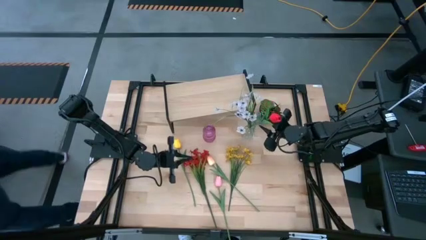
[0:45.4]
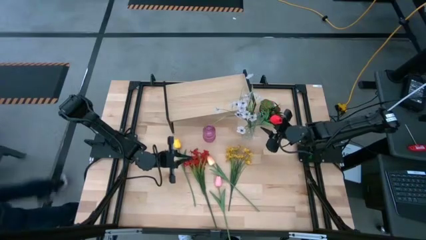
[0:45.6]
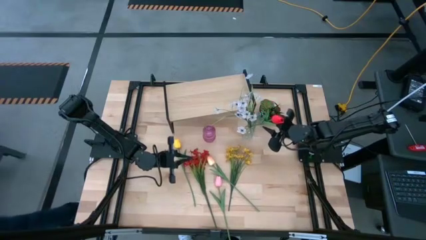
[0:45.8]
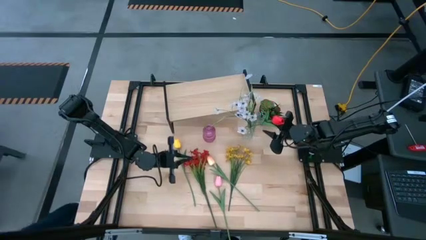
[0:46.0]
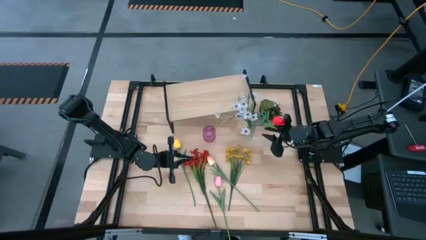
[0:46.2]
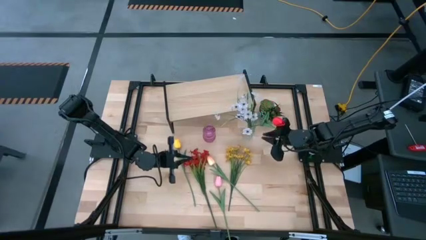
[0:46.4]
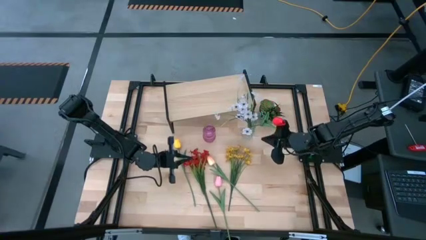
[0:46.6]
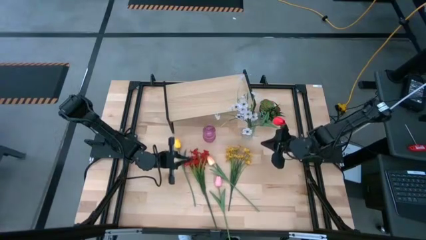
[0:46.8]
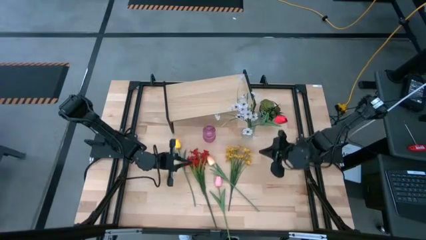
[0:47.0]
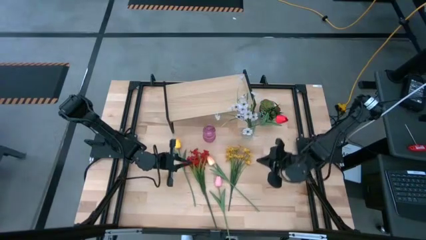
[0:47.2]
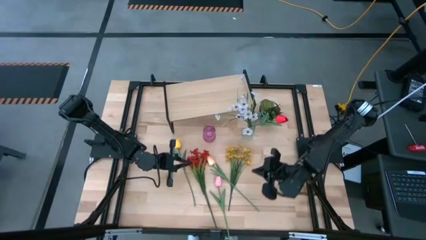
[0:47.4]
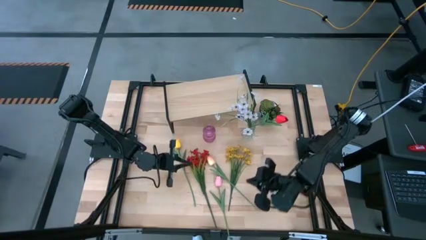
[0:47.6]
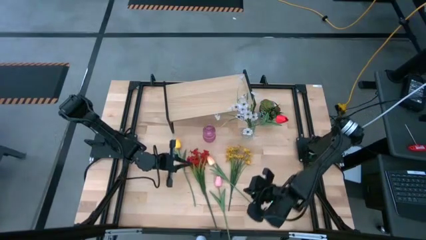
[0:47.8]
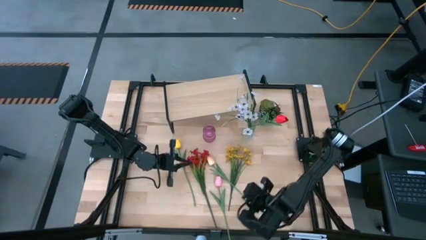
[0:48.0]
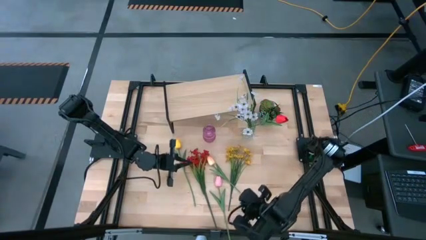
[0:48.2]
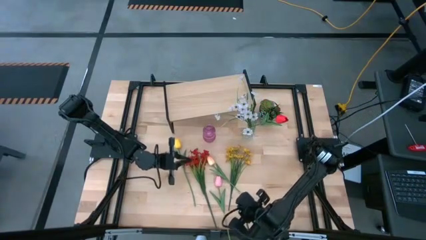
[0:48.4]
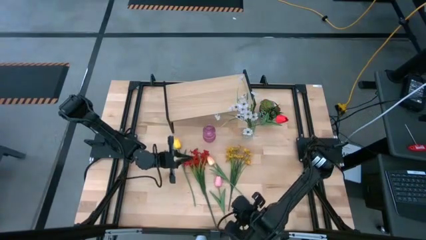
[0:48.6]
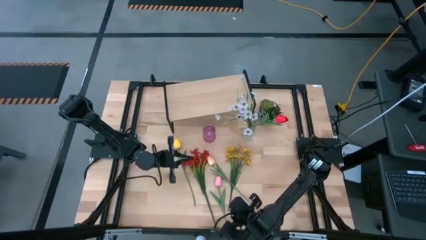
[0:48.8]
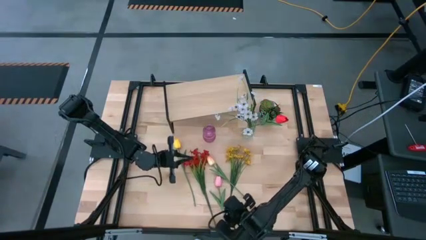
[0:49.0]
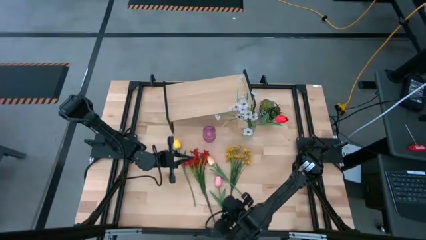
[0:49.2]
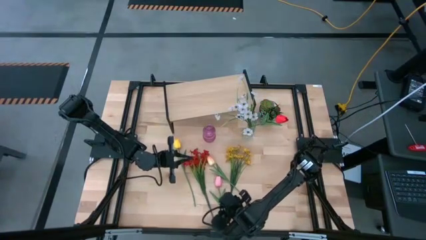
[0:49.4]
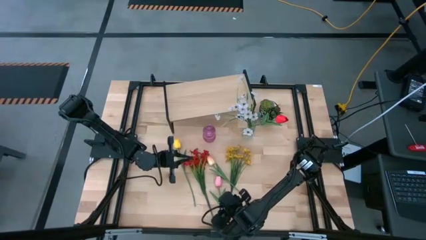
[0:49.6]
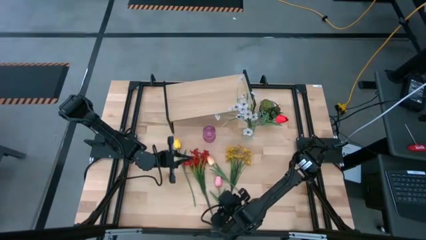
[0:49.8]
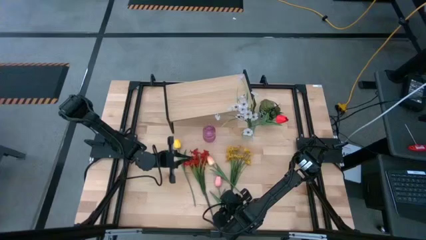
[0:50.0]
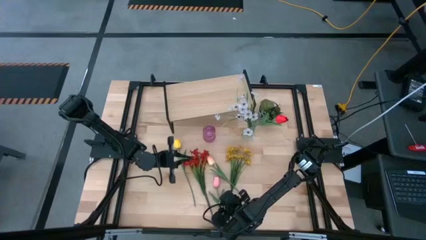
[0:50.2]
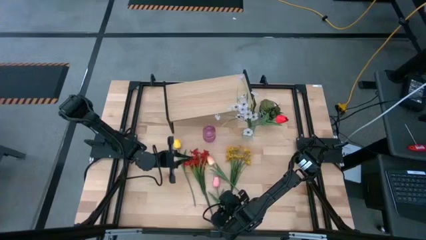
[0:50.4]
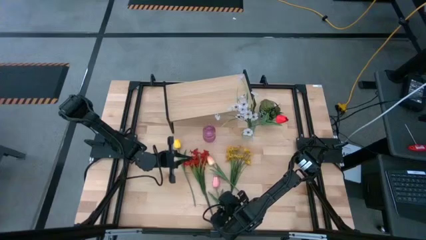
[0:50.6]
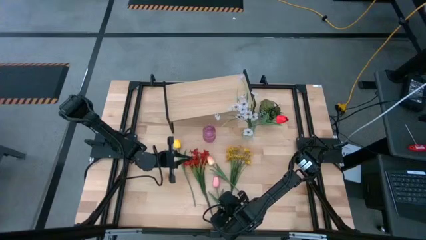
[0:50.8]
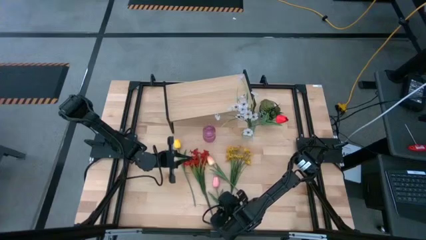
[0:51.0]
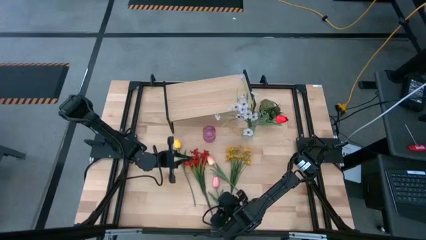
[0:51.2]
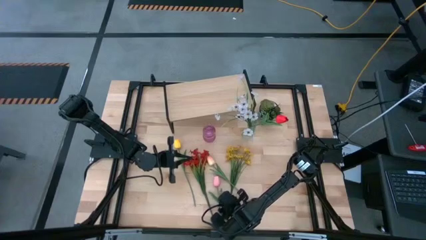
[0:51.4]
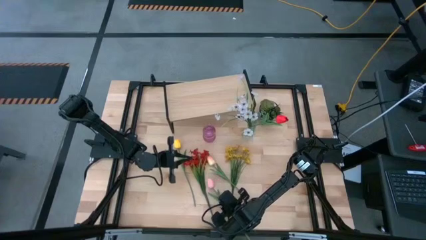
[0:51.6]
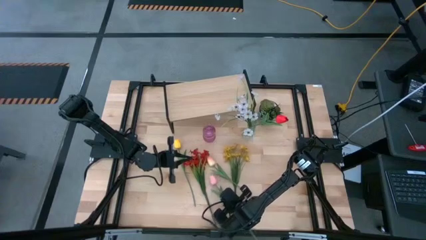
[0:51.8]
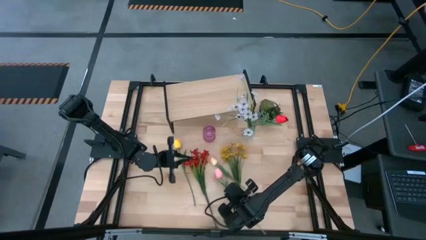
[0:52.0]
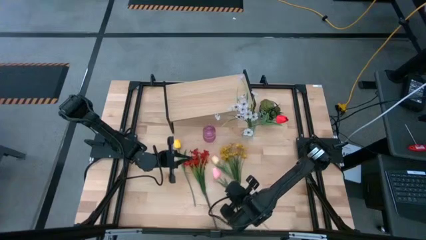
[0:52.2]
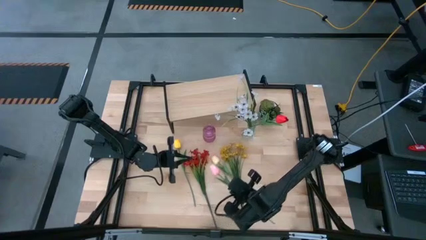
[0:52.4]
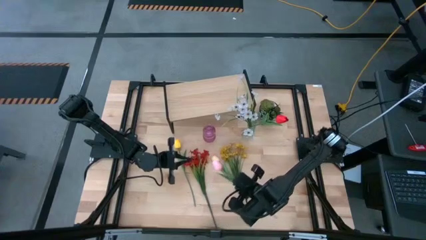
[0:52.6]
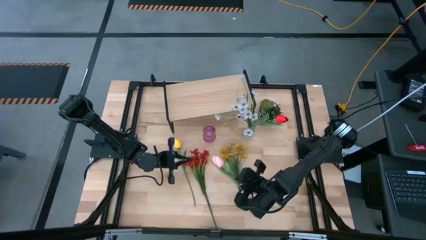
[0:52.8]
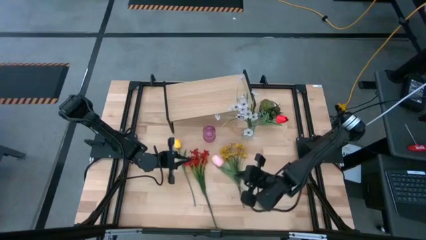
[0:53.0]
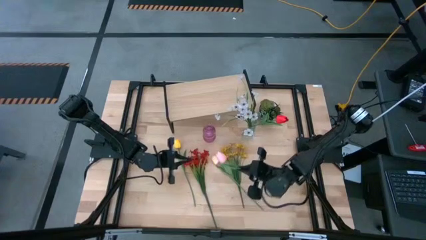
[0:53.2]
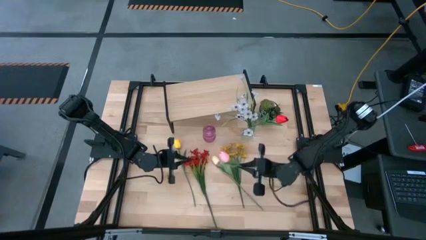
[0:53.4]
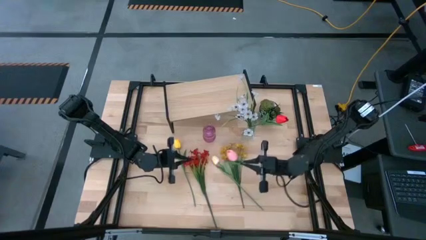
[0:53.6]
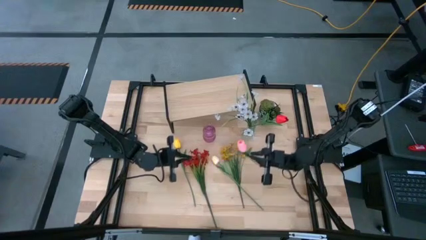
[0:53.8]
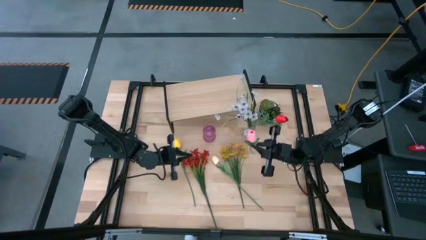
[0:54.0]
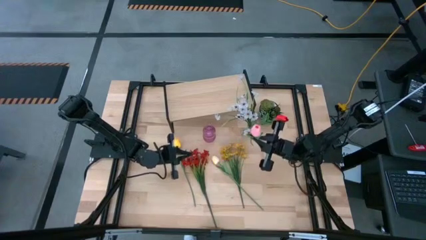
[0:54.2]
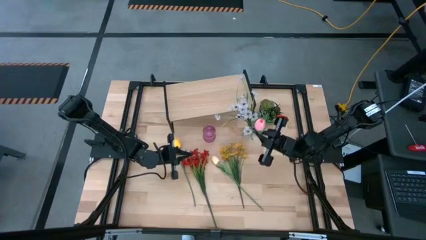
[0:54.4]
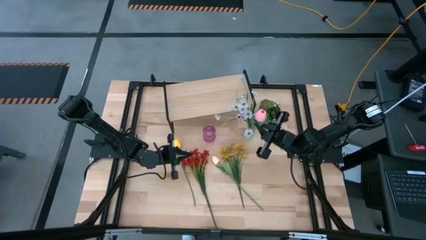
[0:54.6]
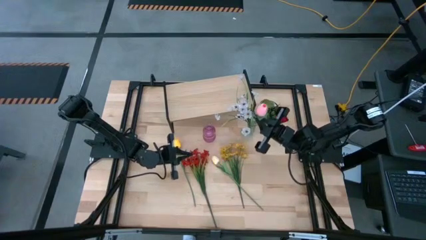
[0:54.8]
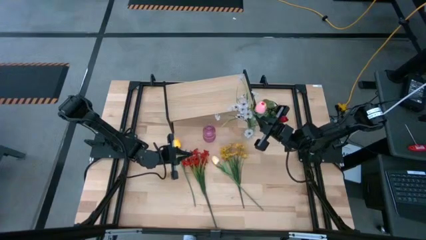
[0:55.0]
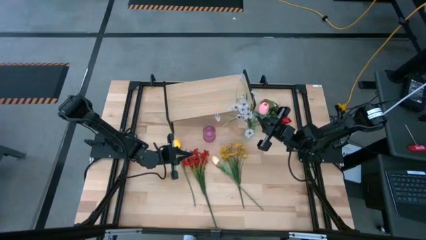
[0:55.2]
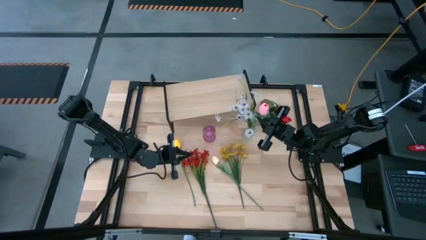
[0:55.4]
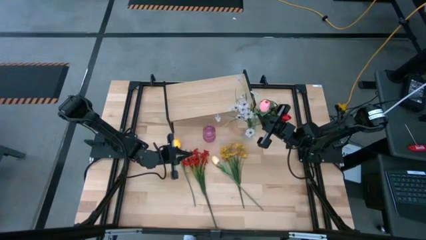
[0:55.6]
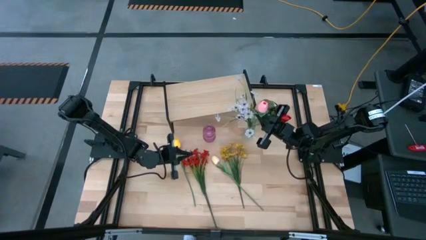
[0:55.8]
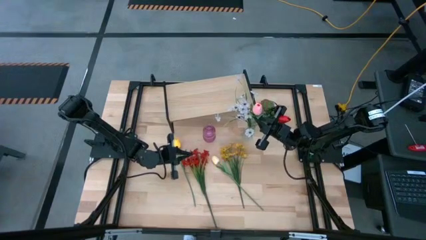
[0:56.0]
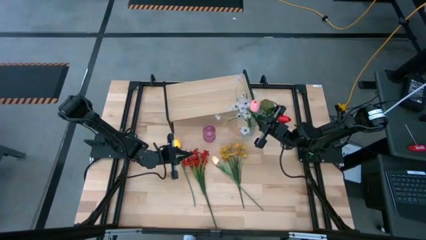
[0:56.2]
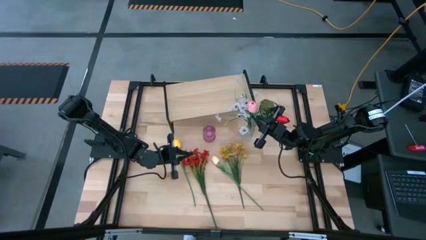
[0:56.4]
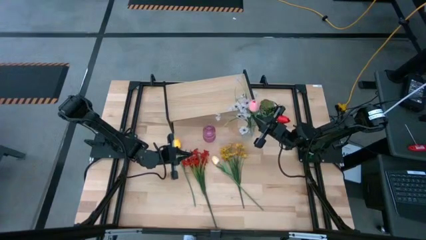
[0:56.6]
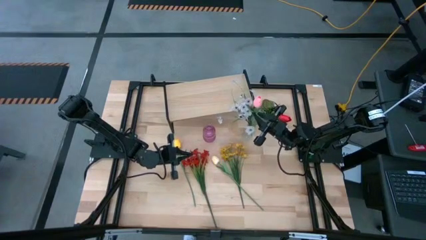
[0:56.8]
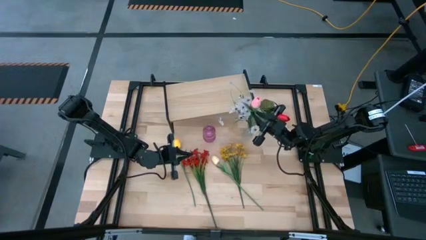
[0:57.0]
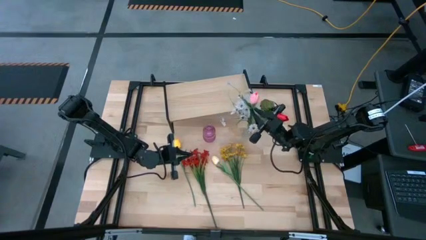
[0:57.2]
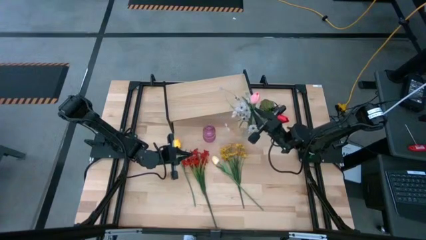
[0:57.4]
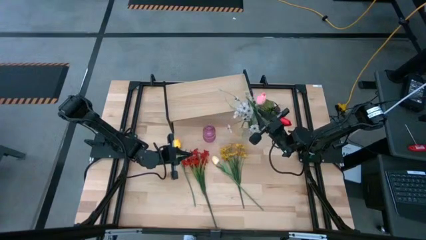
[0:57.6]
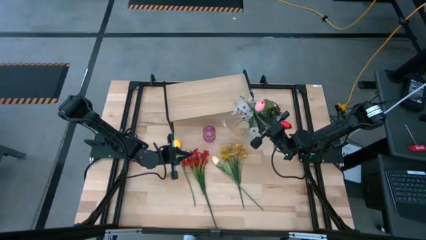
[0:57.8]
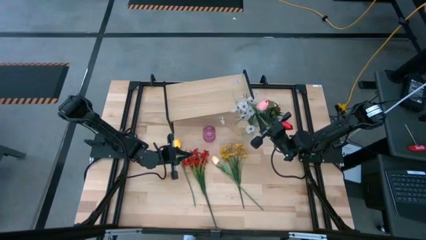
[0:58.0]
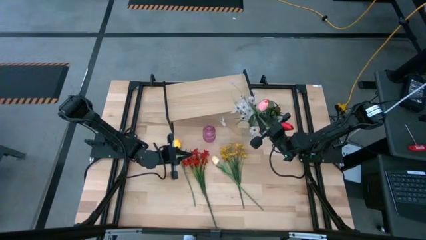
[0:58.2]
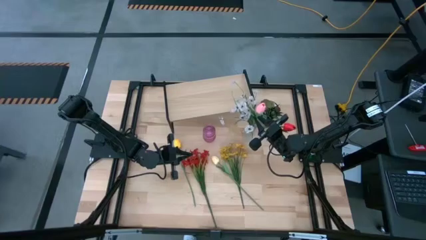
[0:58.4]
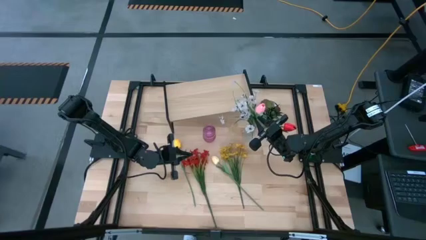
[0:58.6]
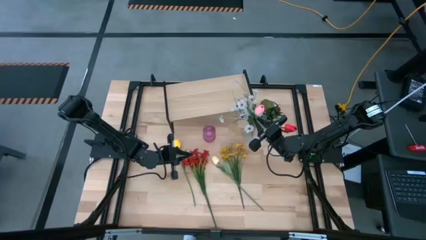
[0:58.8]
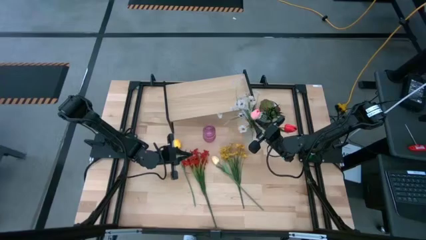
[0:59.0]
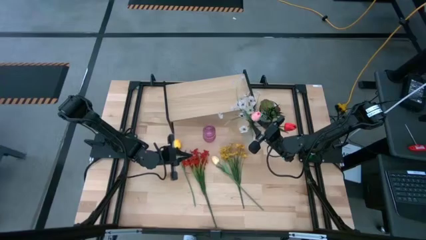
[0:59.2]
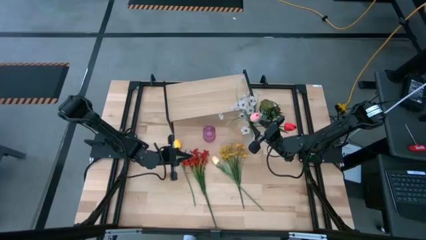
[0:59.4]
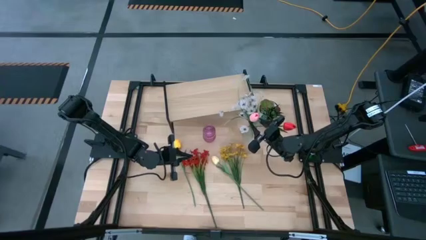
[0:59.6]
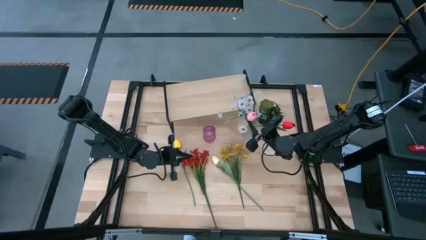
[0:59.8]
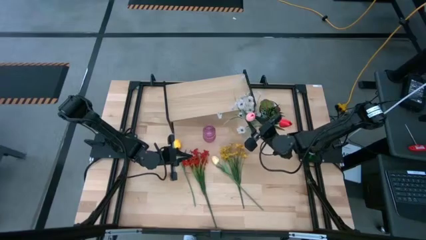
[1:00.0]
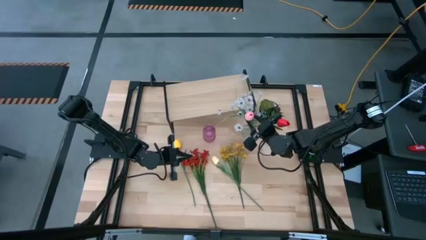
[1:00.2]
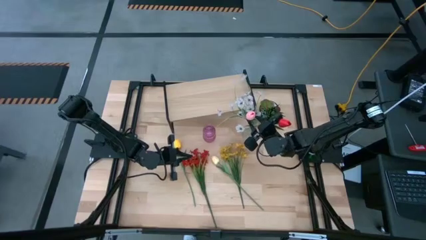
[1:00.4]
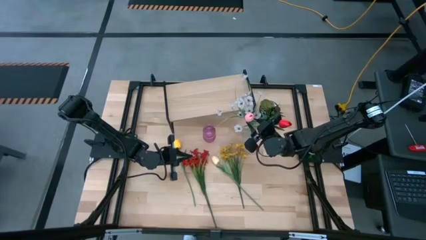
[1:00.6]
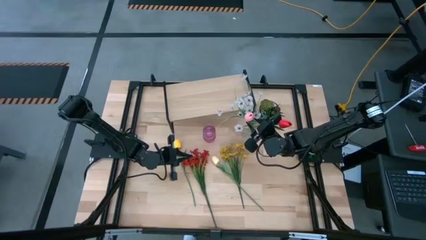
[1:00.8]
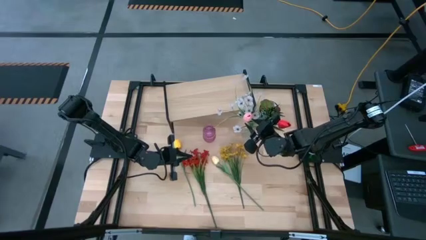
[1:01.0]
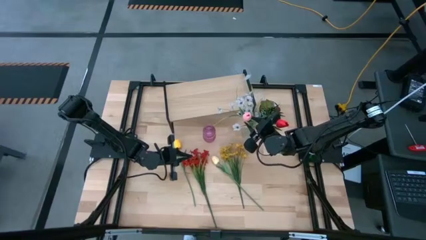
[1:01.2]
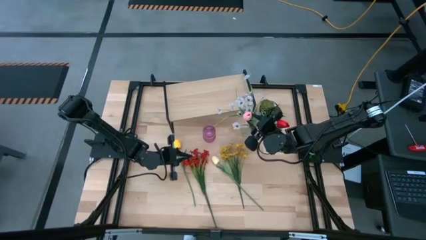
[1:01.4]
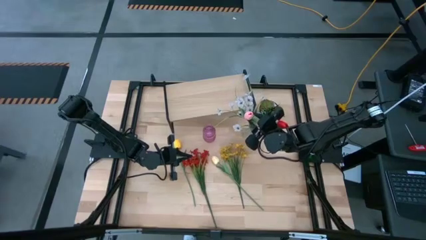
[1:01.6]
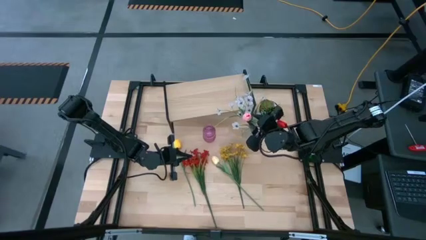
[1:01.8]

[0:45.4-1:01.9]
Task: Pick and place flowers into a vace then onto a shelf
Put the pink flower into the transparent vase
